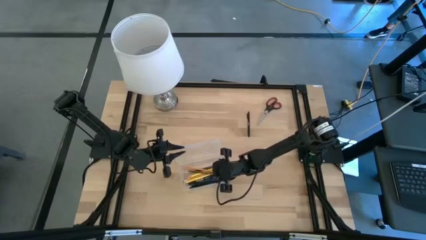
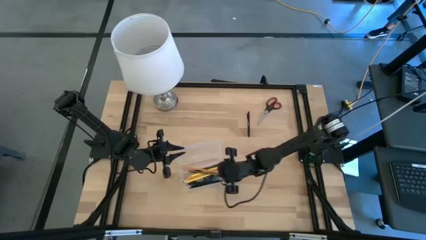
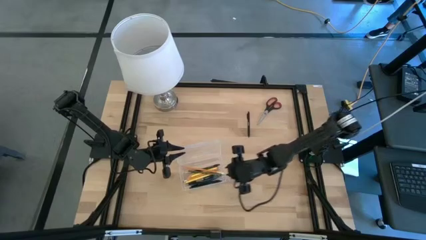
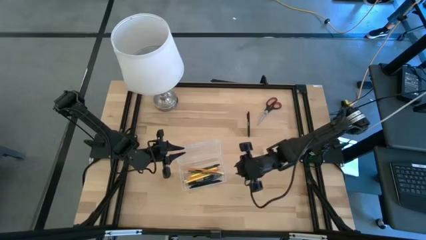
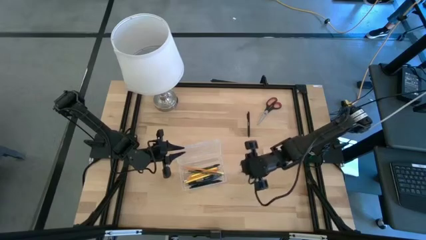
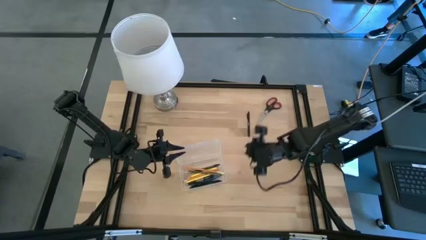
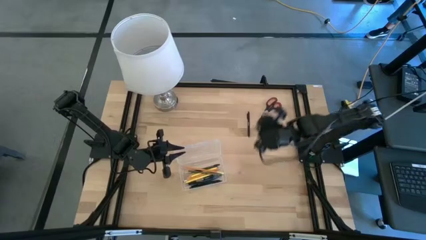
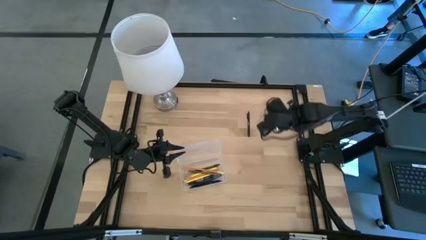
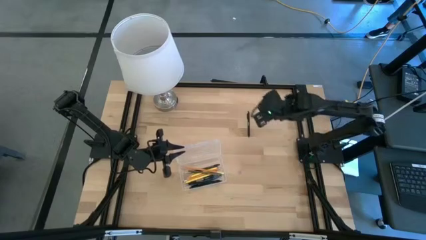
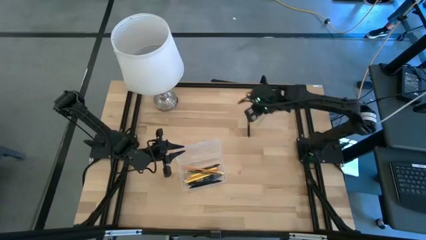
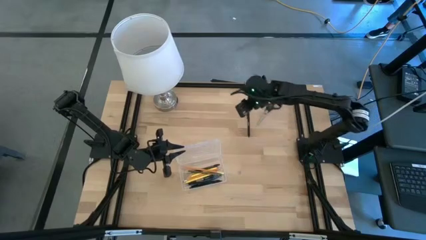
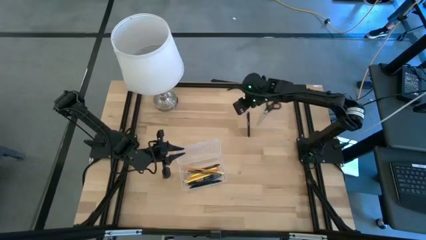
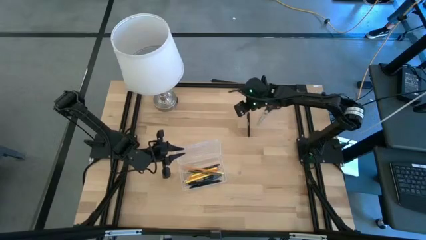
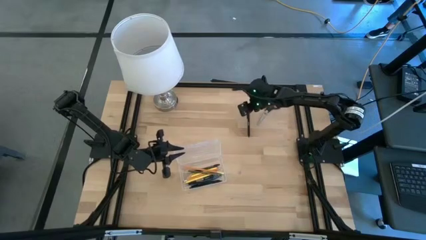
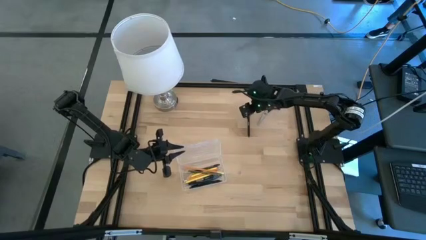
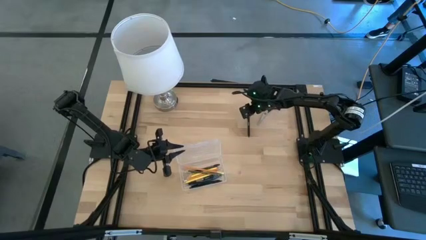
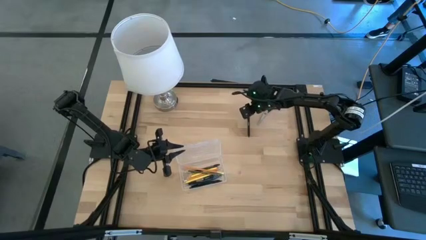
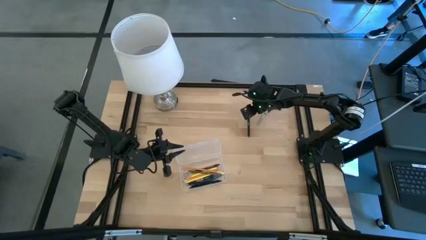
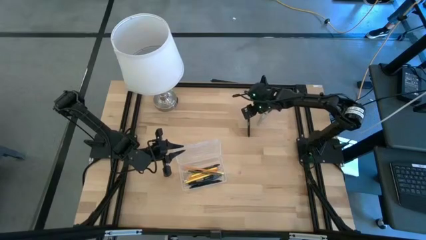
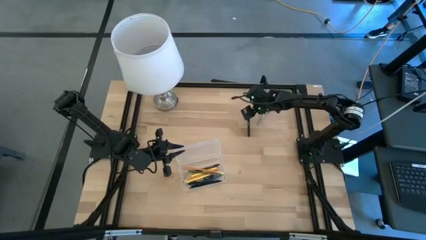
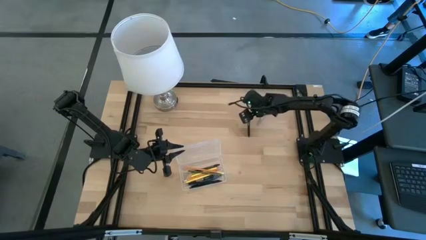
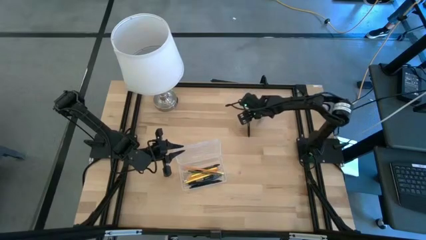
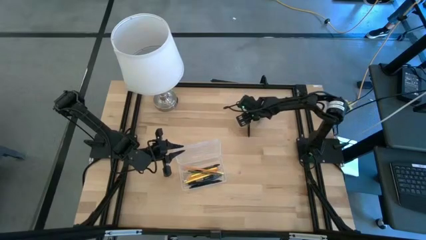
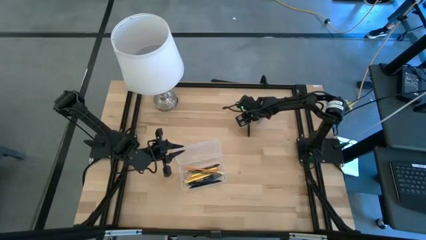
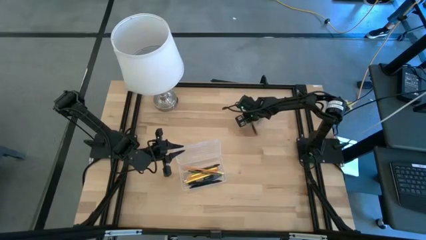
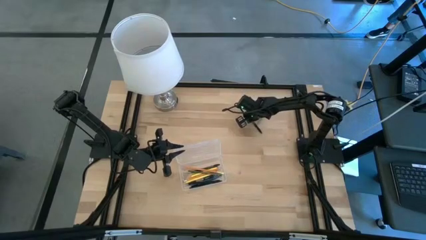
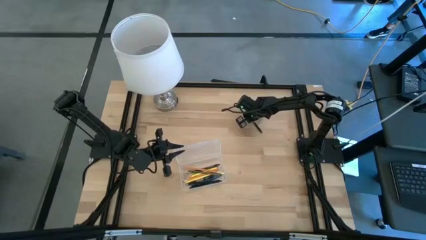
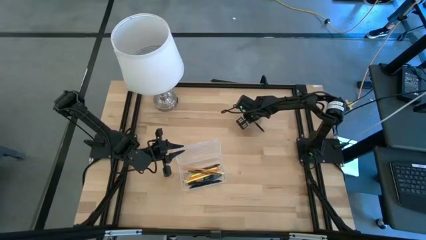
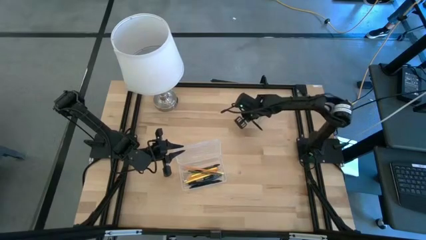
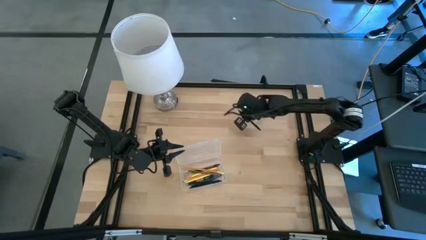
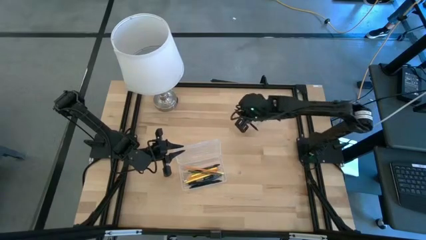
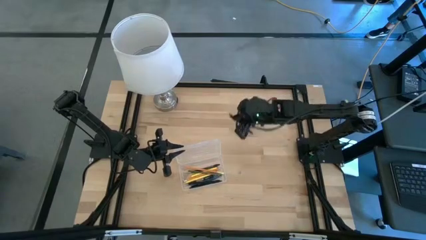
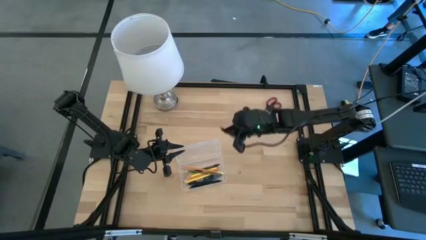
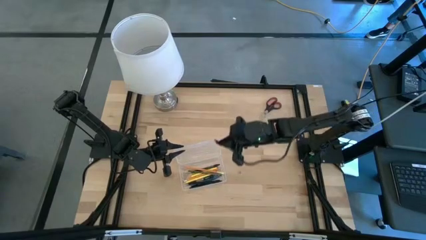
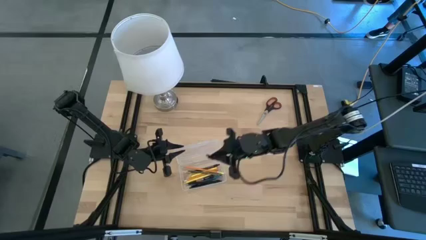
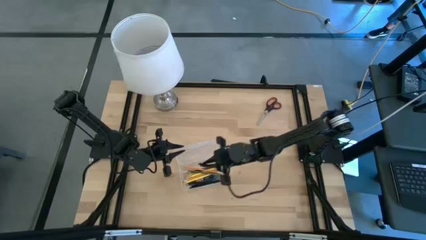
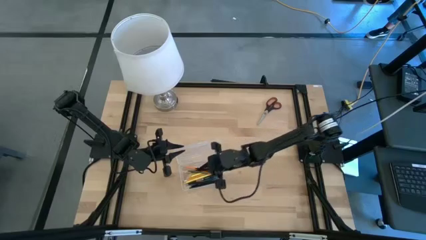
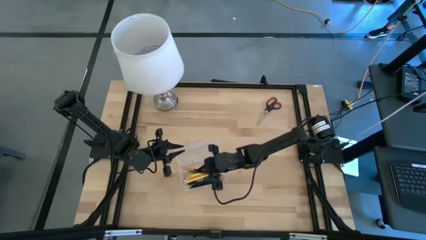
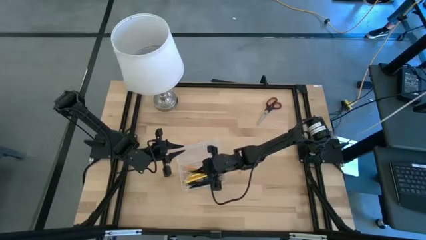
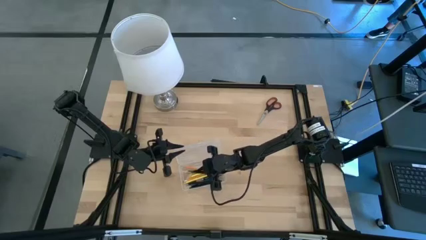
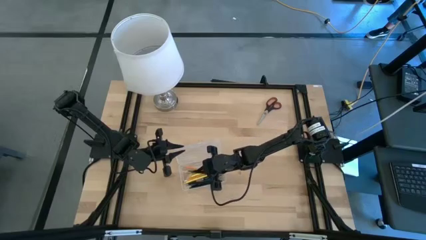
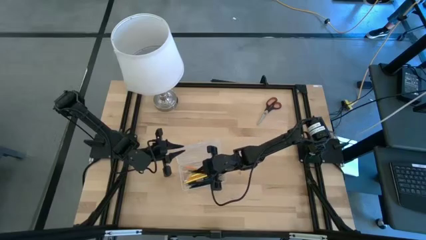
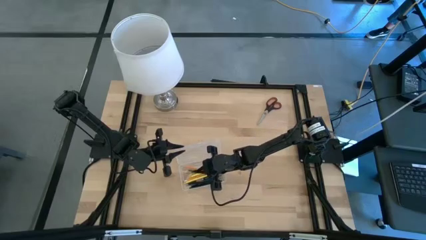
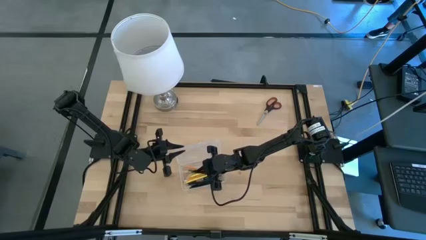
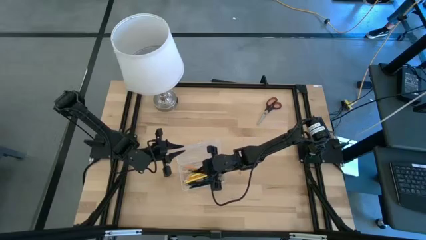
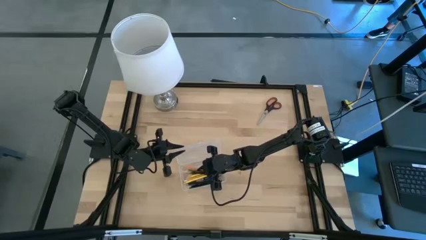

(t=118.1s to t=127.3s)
Task: Pick & place school supplies into a supply box
Put the black pen into the transparent supply box

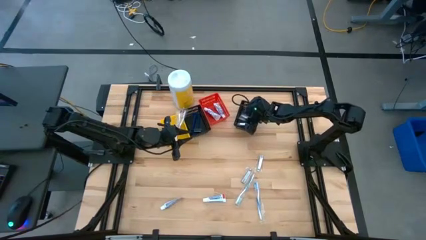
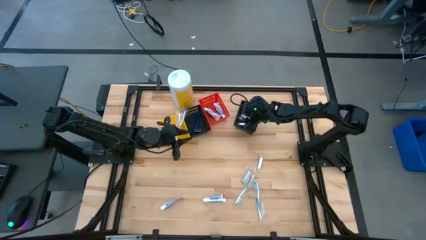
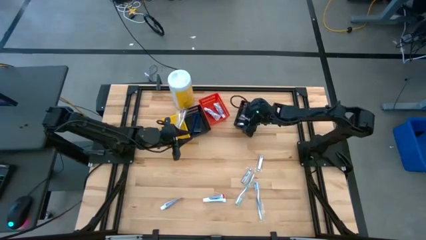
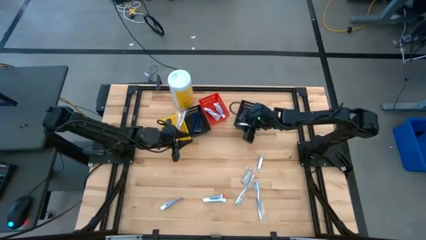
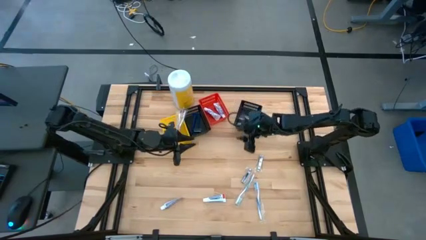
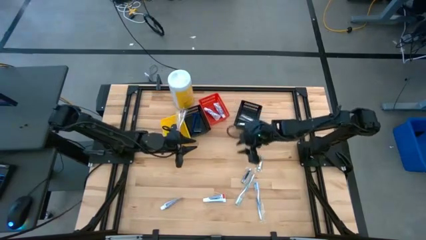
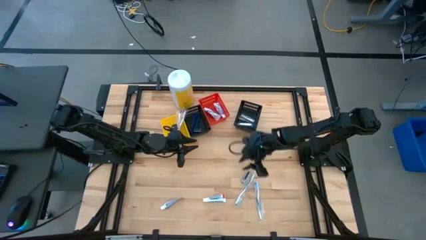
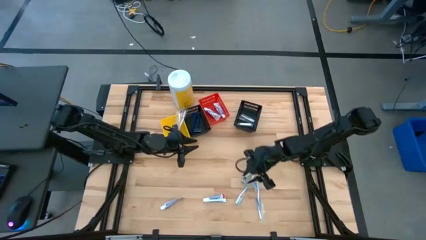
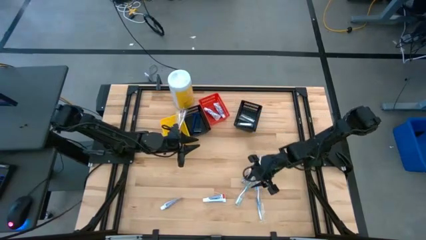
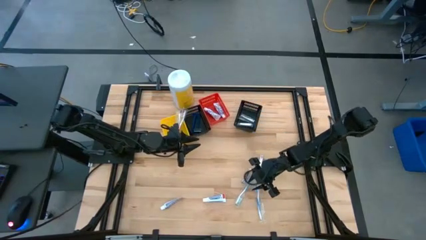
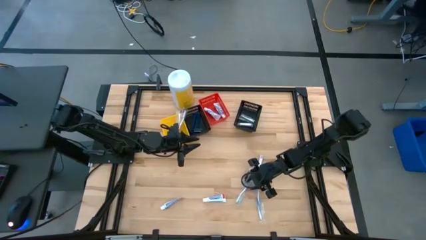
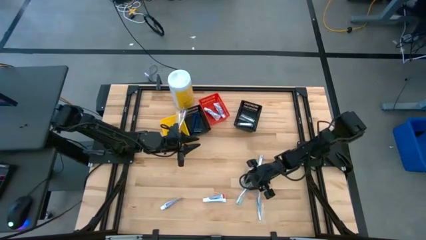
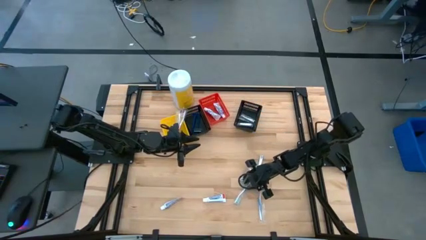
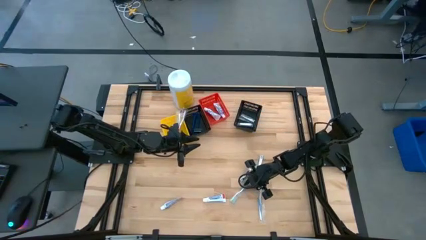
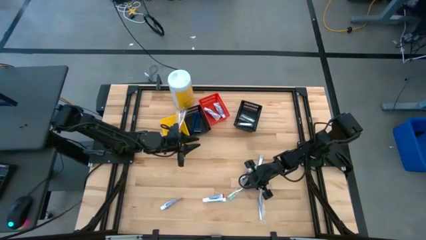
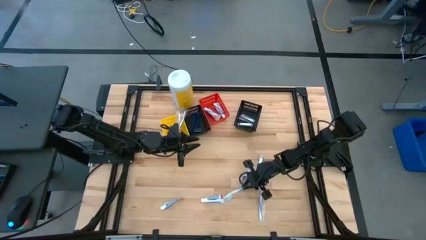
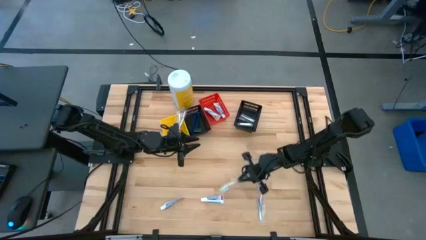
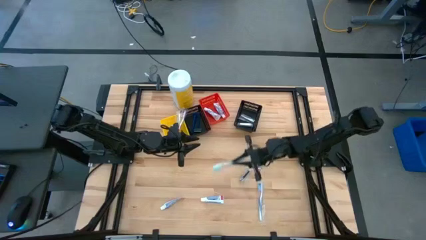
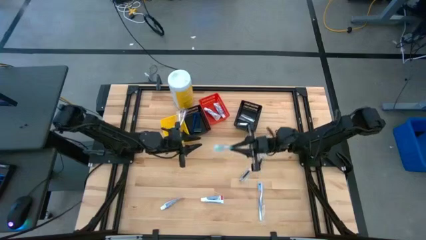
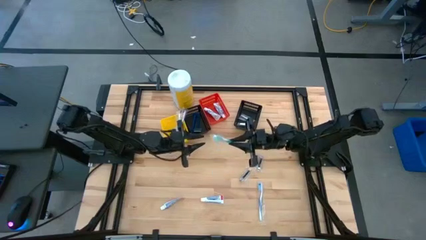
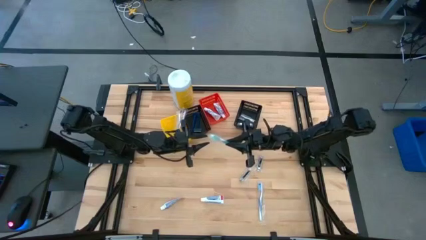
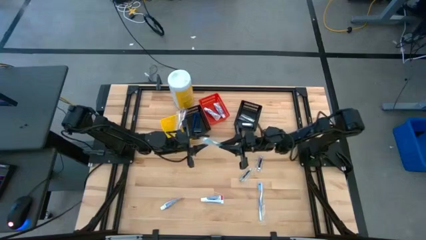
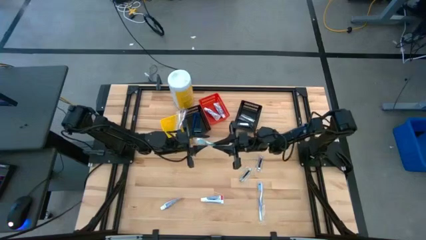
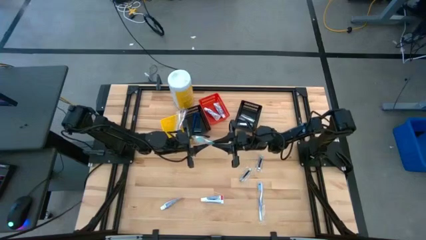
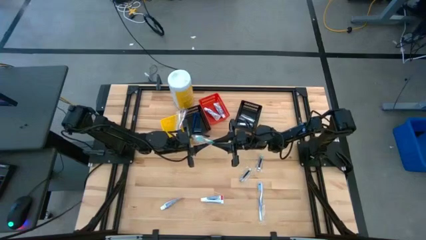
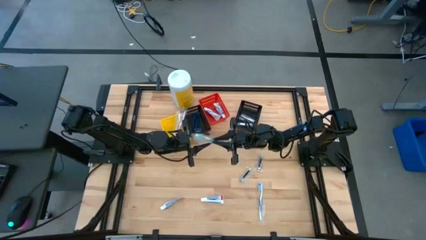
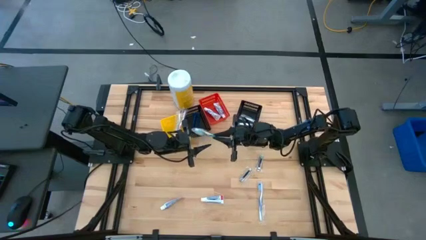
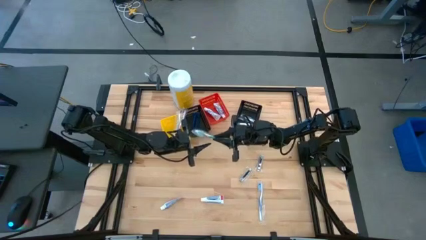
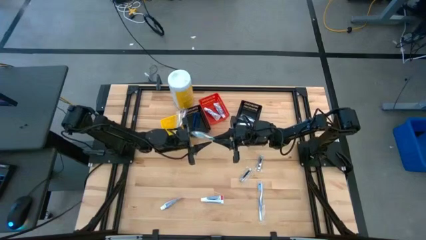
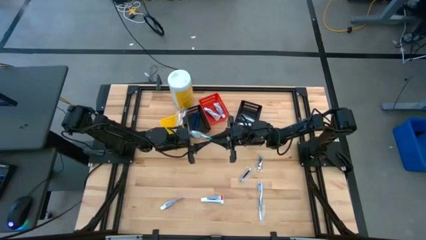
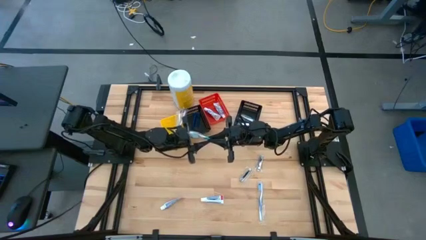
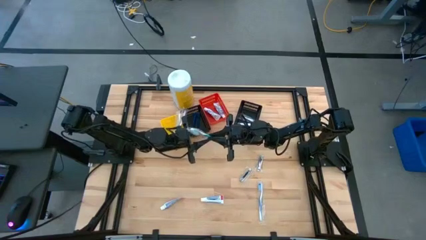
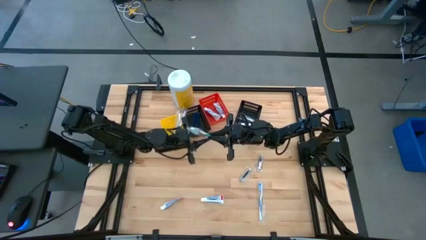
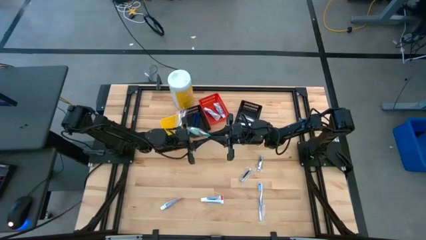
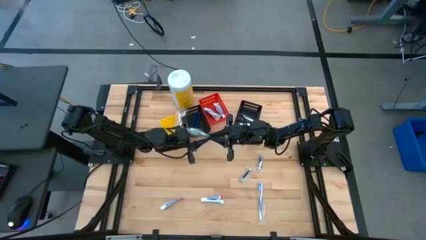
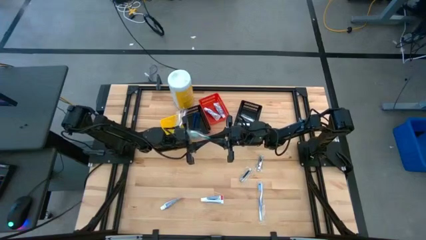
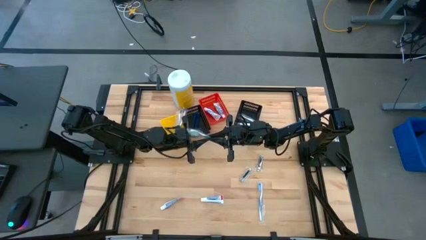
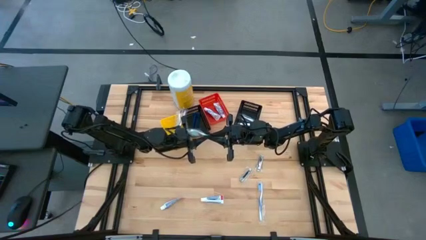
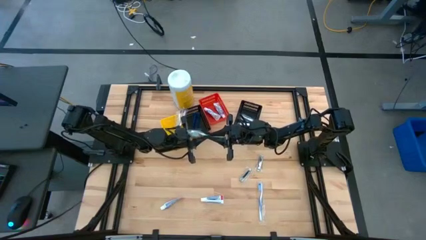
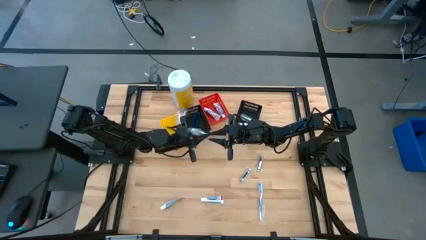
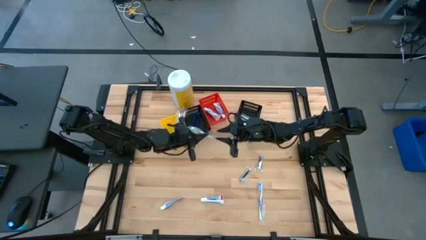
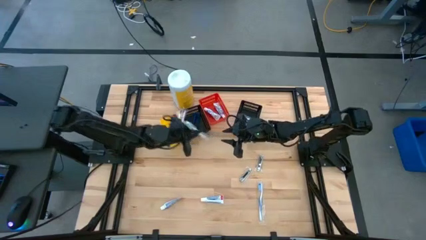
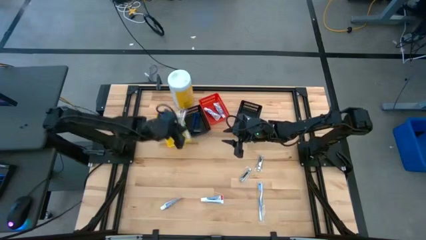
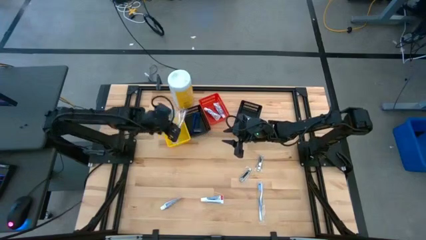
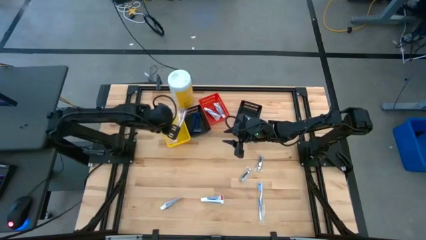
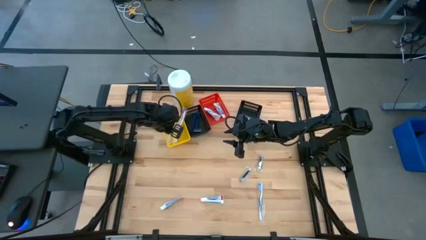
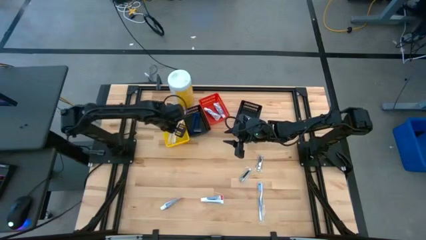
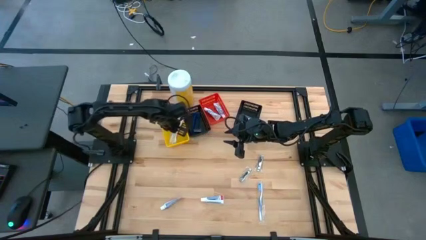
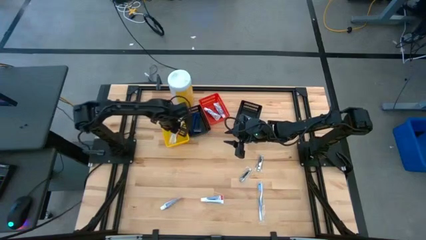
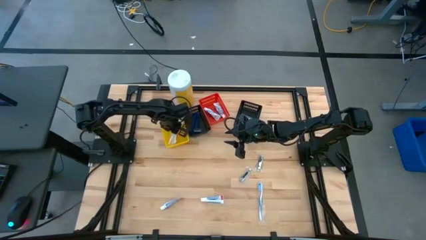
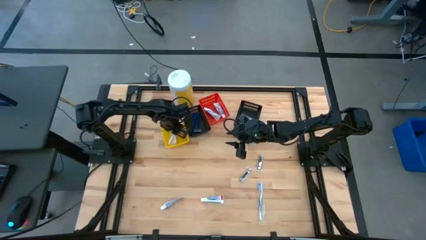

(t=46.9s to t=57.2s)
Task: Pick & Place Travel size toiletries
Put the green toothbrush into the yellow bin
